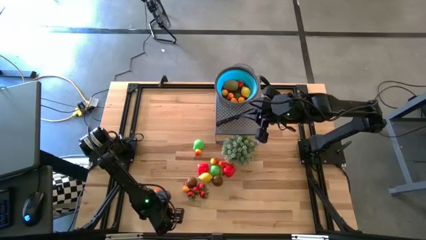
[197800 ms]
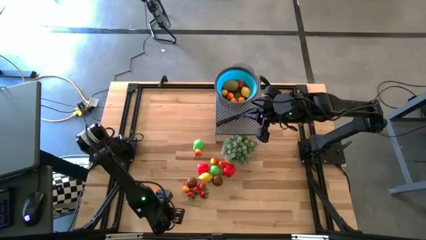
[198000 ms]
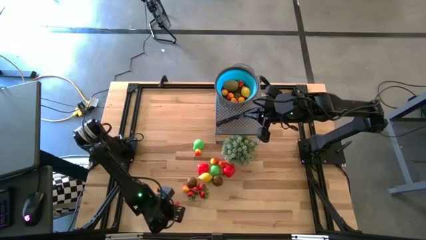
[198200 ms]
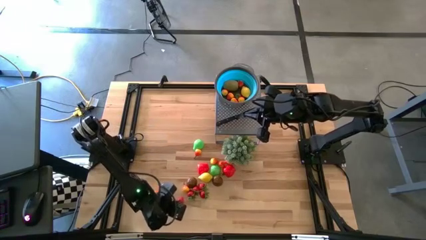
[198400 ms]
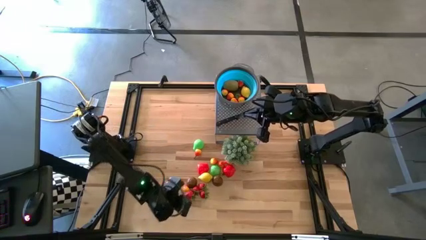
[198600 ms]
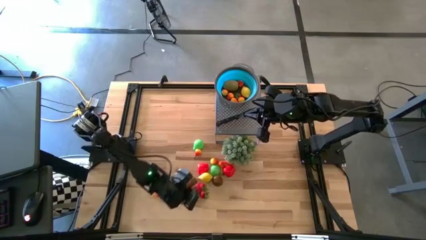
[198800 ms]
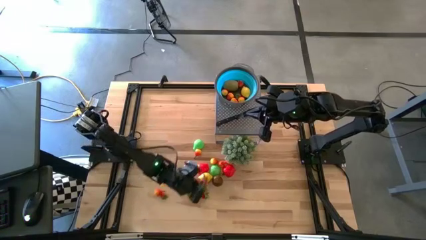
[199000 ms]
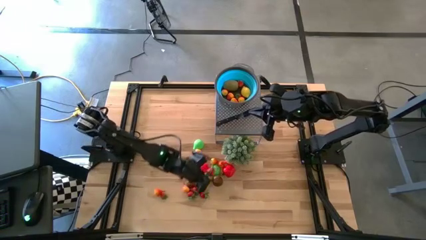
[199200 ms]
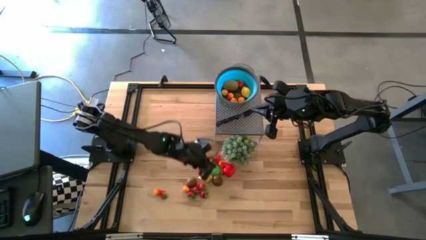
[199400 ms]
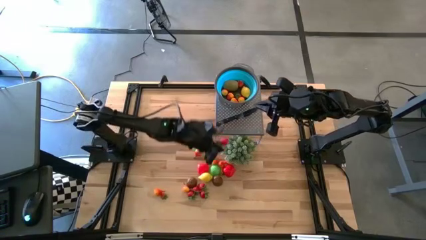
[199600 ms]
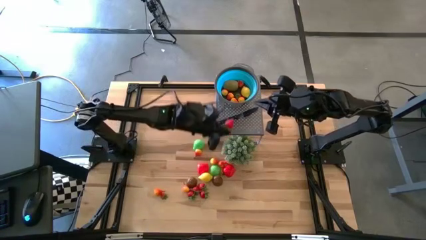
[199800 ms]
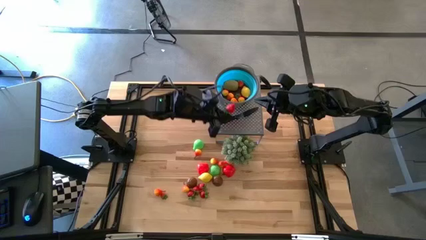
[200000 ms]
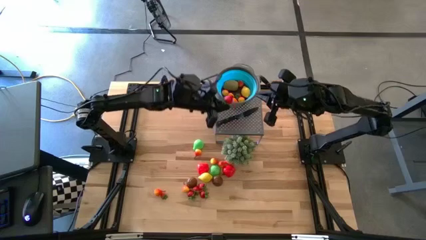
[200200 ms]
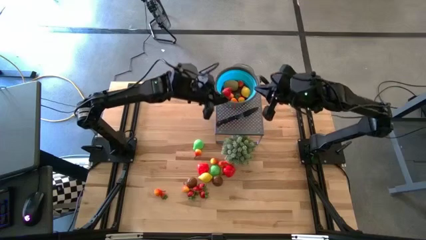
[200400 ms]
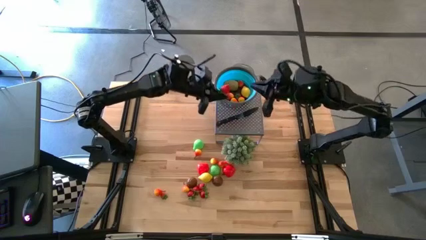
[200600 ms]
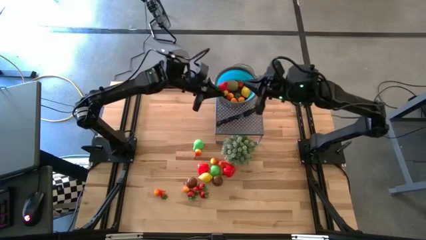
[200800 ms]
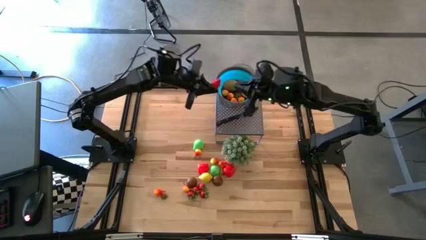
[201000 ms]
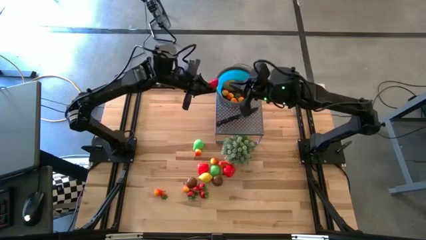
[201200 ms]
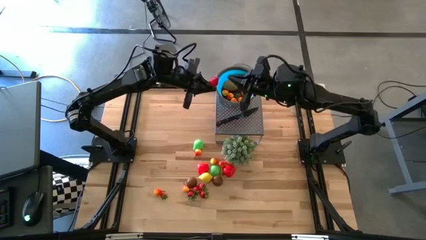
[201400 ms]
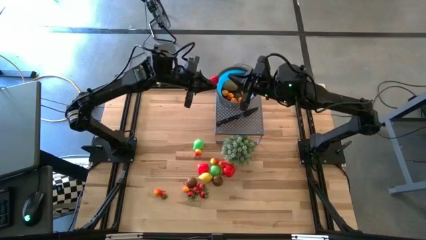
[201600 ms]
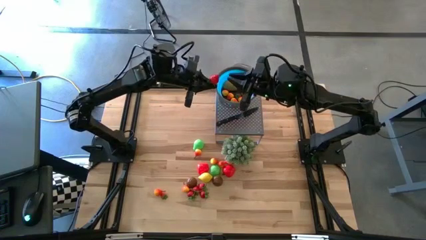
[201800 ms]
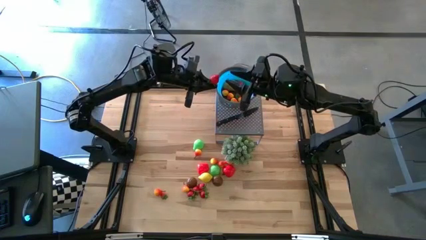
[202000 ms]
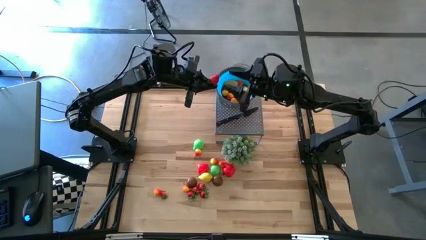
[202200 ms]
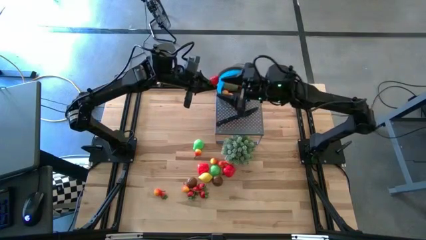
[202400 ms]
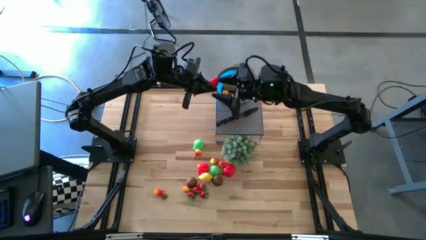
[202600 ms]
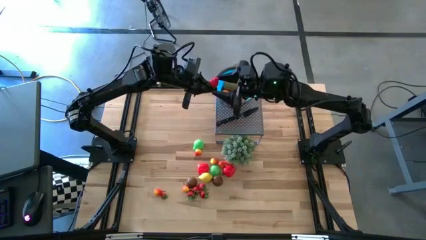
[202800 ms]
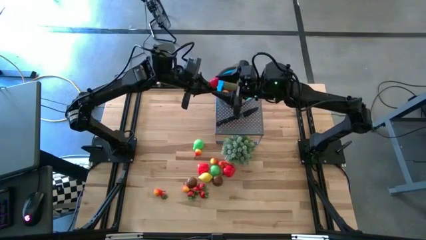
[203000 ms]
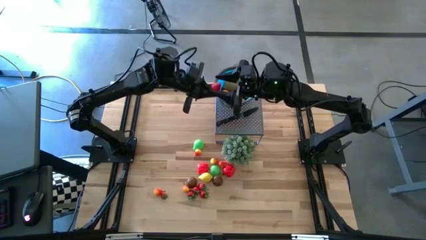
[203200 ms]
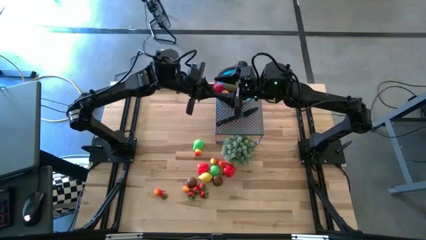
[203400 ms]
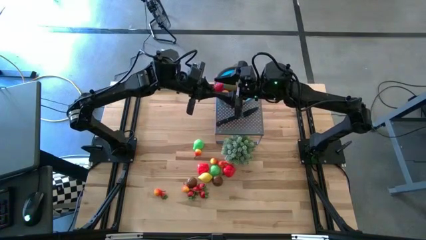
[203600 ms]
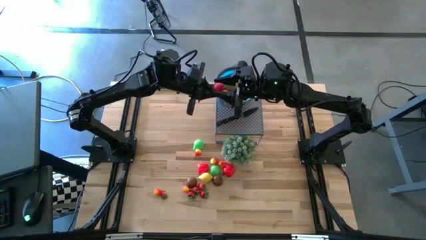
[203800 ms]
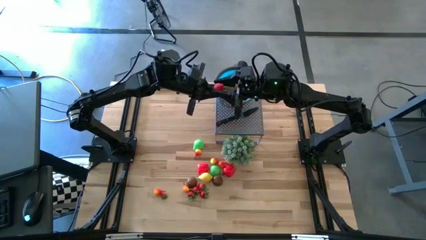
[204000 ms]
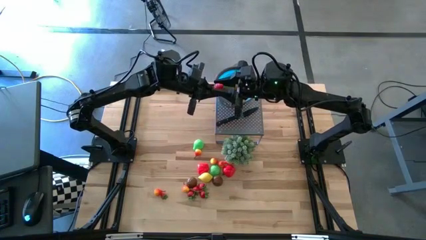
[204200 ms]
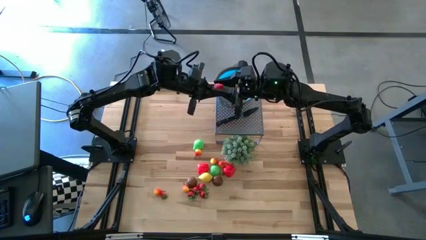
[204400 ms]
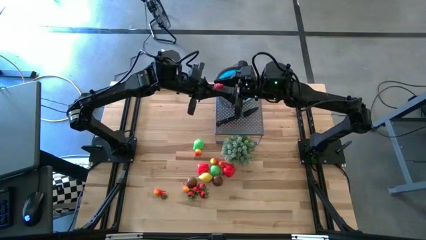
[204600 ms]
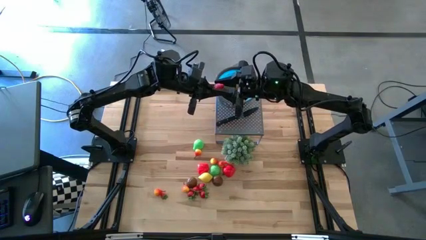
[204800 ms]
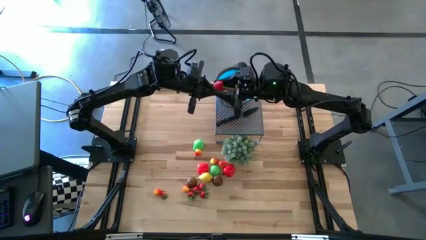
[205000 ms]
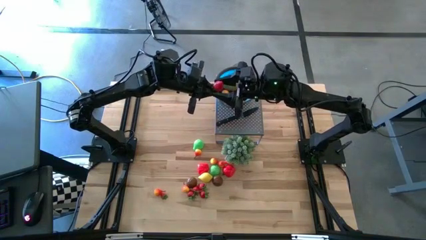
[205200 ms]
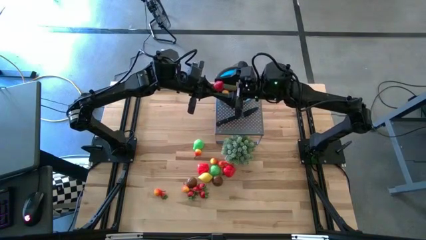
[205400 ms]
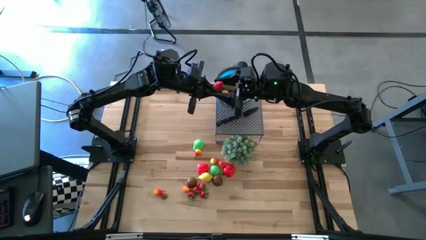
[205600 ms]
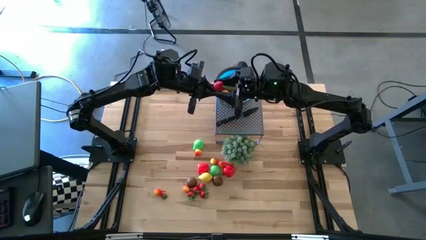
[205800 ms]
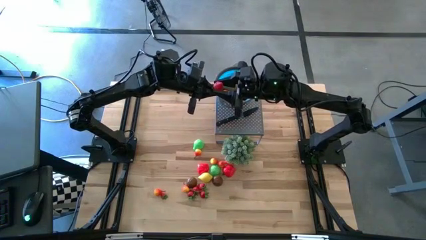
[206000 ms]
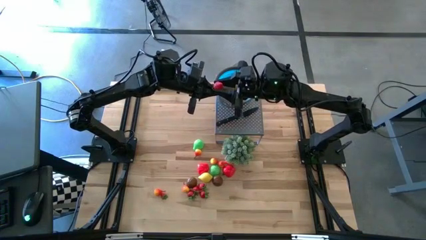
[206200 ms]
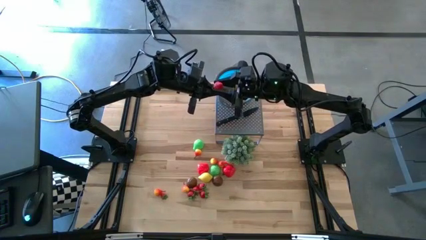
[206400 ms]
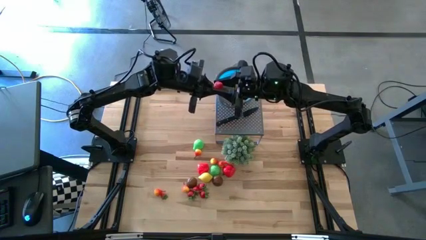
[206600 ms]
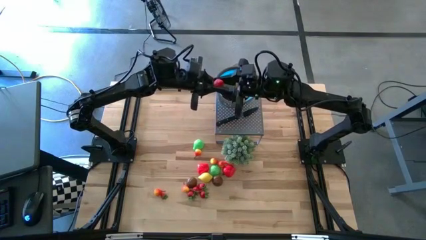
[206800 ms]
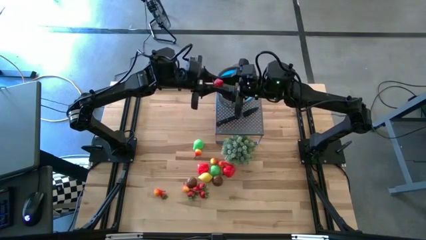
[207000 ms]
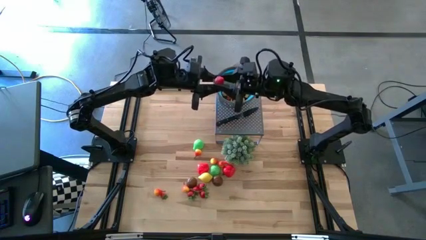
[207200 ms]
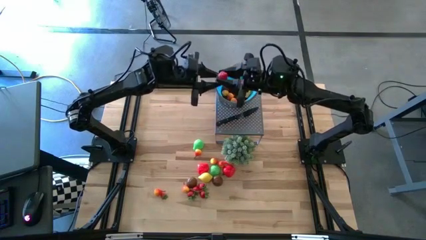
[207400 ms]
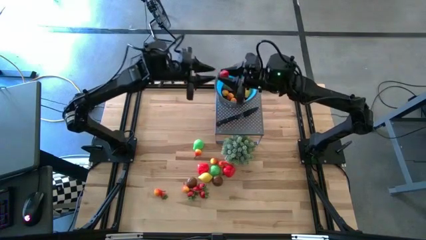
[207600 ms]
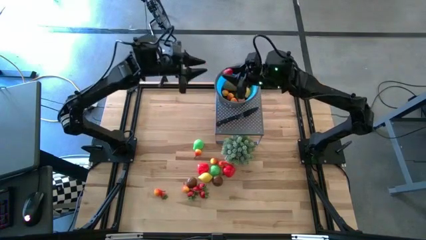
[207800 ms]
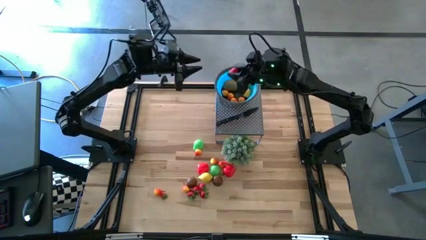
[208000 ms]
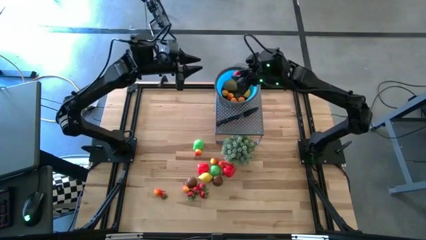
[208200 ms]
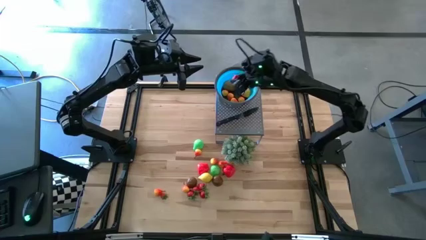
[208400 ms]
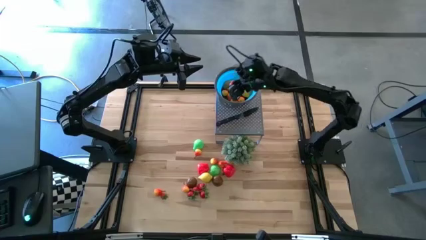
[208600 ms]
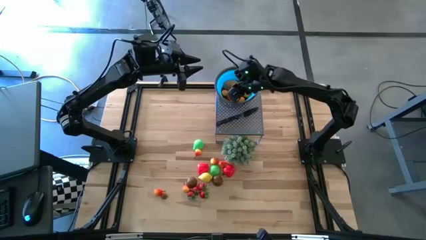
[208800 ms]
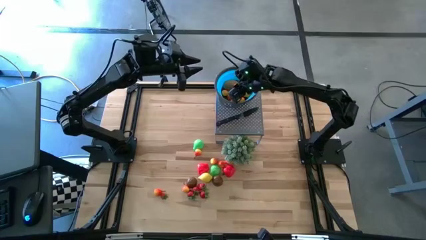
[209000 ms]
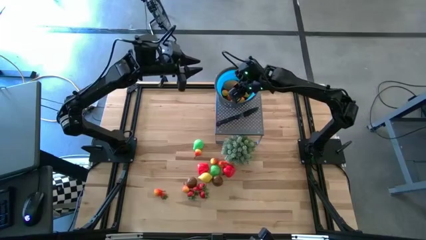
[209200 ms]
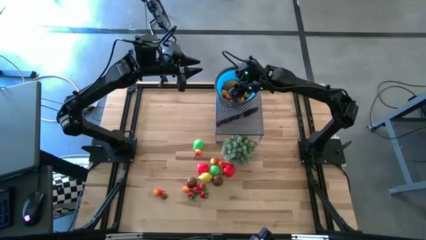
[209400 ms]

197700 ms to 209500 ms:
Task: Pick & Place Fruit
Put the red strawberry into the blue strainer bowl

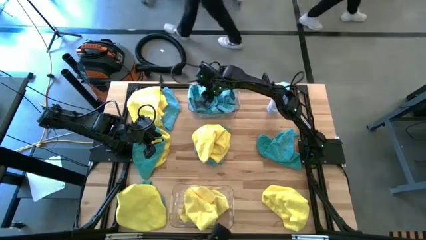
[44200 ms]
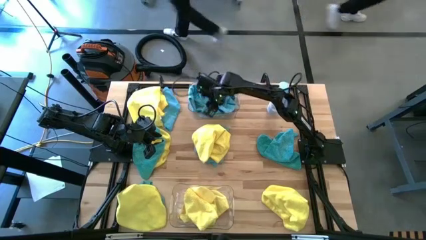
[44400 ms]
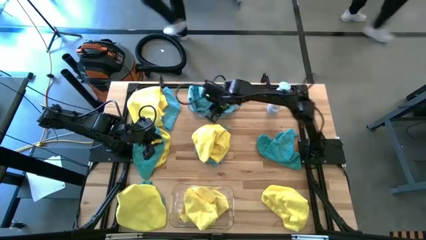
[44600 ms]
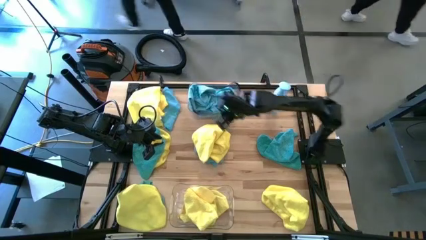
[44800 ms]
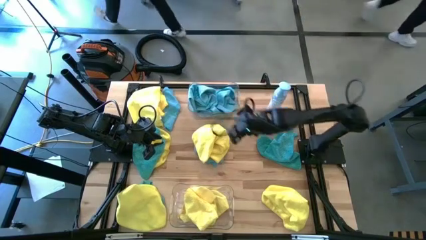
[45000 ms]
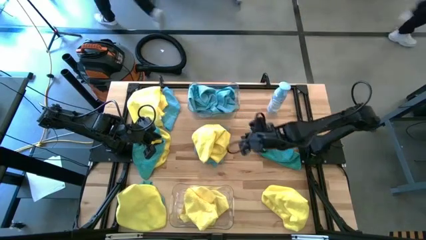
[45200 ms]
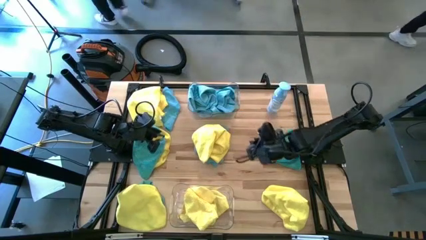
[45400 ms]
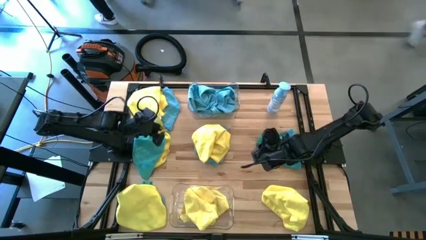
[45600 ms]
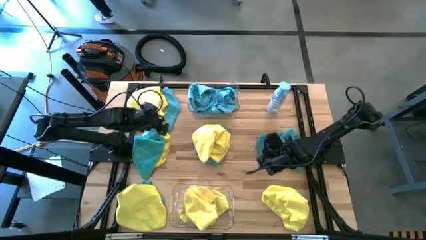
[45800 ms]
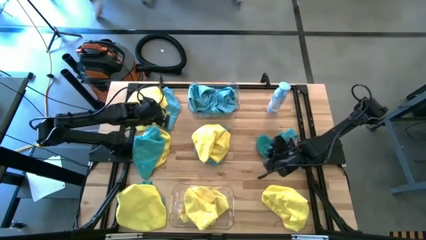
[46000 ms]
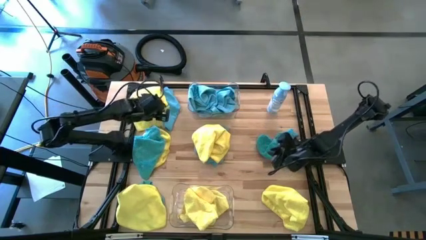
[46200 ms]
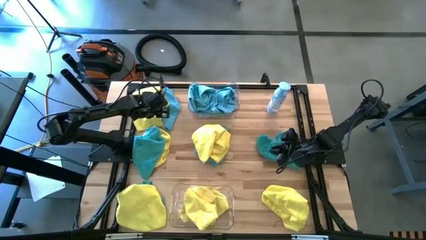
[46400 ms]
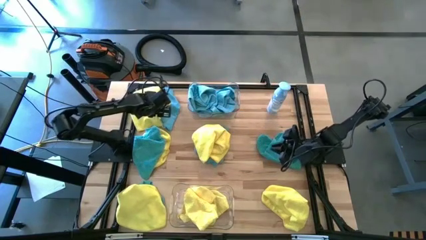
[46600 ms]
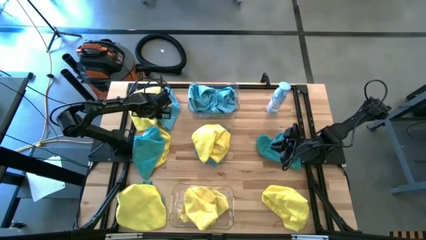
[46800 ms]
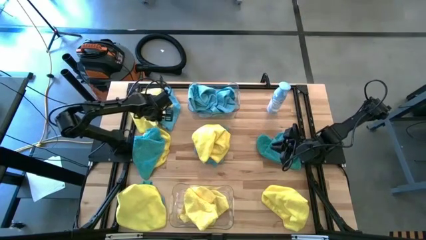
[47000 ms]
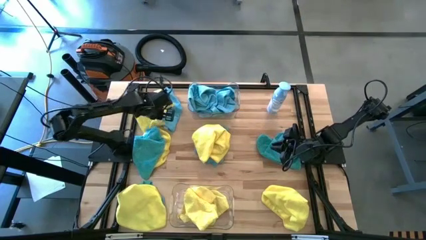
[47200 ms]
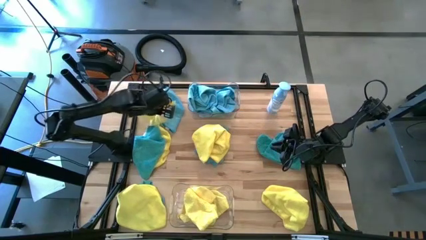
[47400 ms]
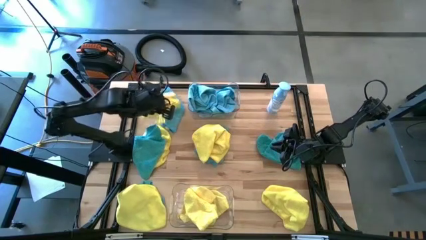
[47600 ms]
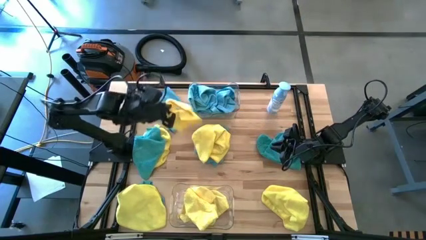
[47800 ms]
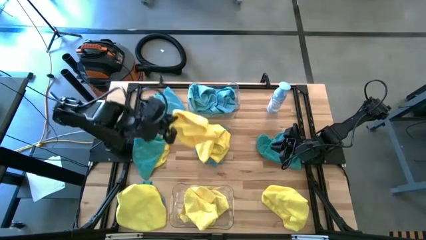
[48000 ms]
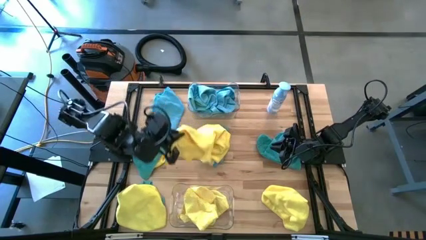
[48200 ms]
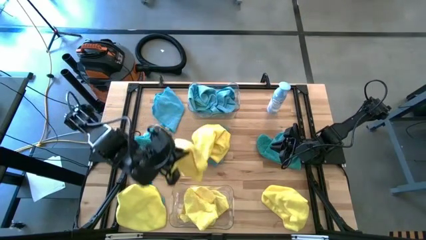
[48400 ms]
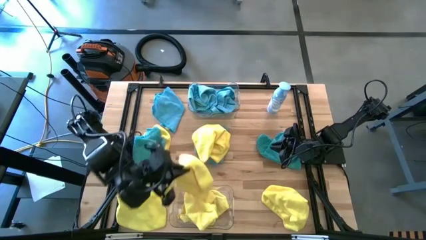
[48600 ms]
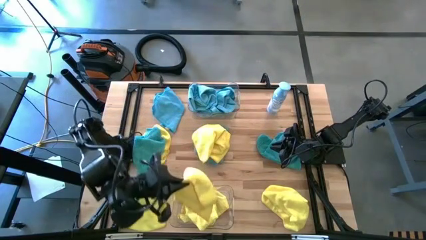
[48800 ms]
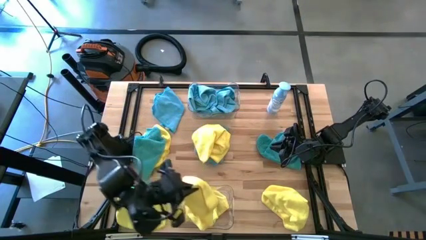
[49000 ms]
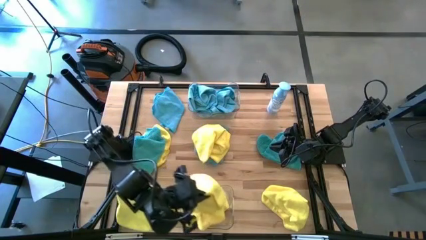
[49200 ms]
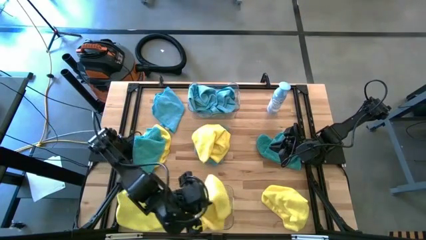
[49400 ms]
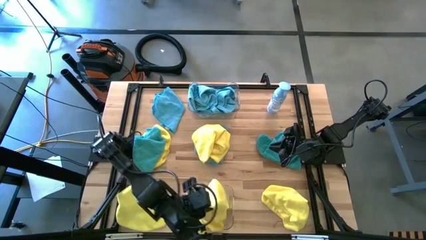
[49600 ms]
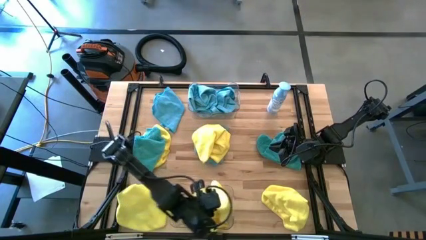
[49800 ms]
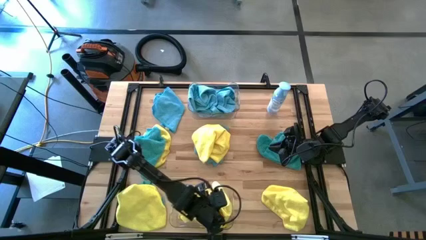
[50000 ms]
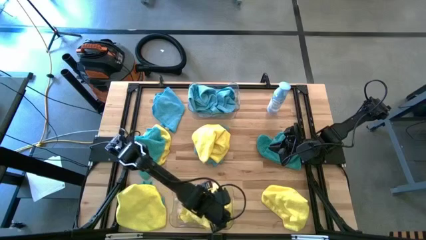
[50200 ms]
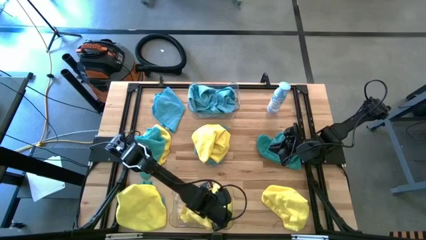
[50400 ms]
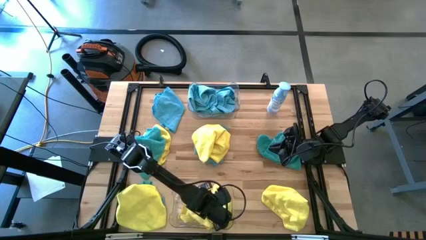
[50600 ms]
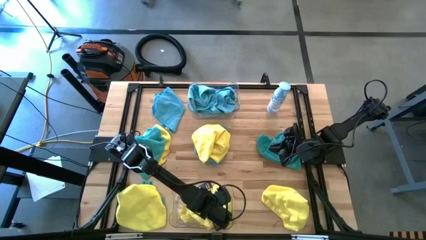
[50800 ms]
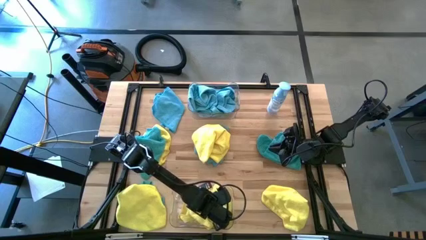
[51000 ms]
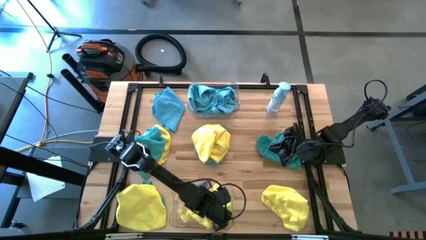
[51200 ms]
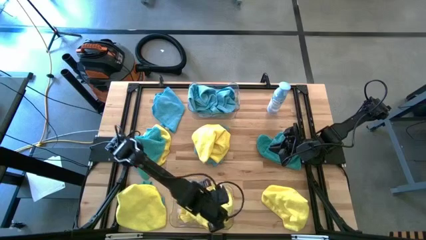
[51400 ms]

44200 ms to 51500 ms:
Task: Sort microfiber towel by color & place in baskets
Put the yellow microfiber towel into the bottom transparent bin
